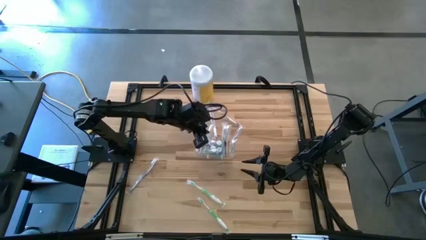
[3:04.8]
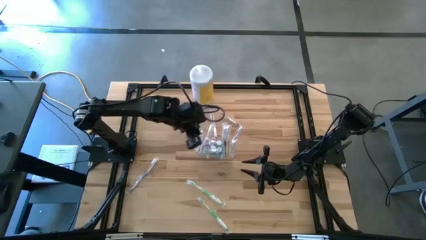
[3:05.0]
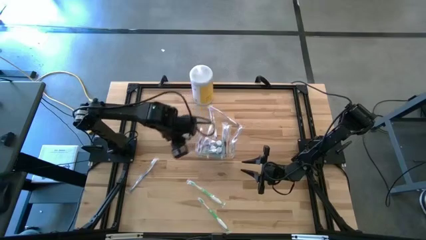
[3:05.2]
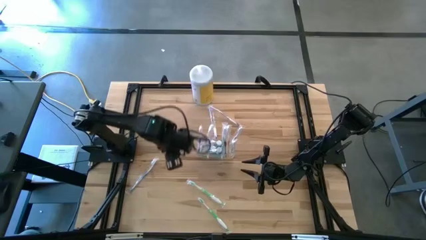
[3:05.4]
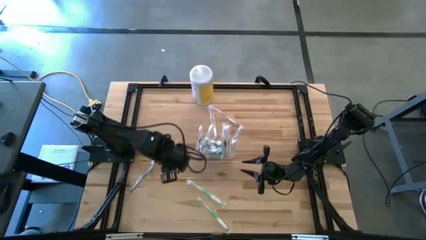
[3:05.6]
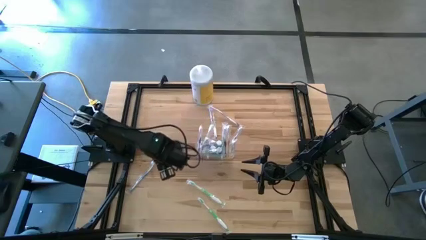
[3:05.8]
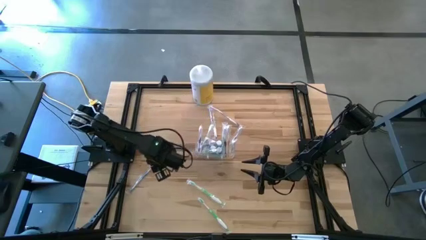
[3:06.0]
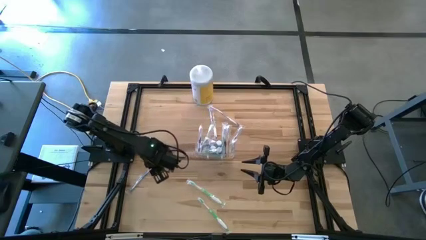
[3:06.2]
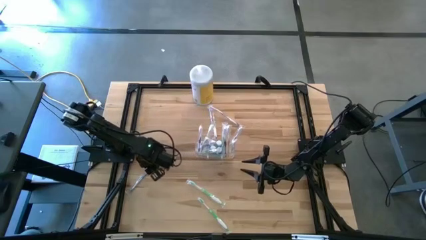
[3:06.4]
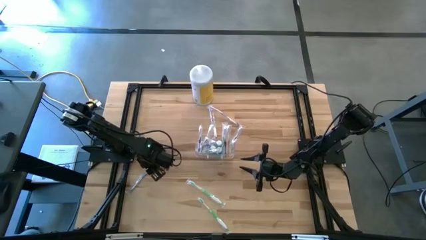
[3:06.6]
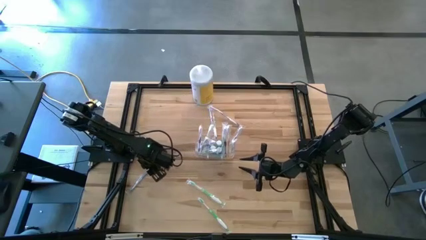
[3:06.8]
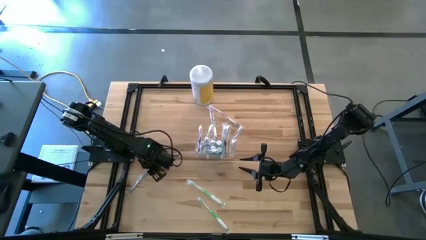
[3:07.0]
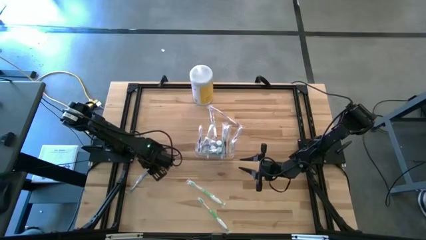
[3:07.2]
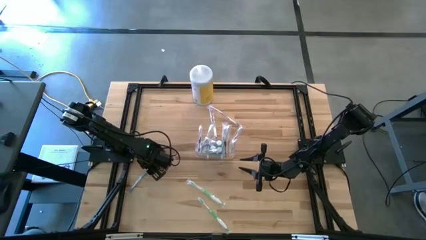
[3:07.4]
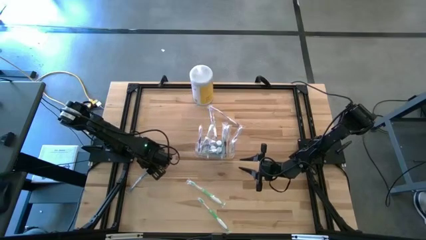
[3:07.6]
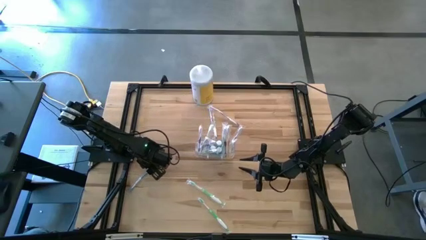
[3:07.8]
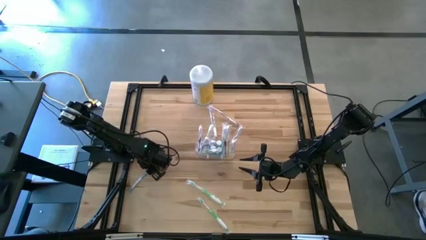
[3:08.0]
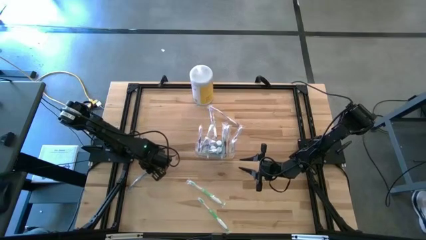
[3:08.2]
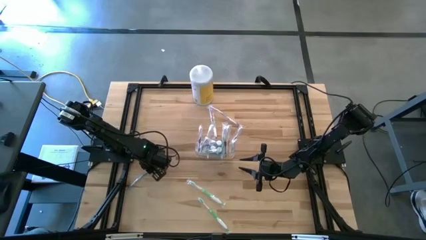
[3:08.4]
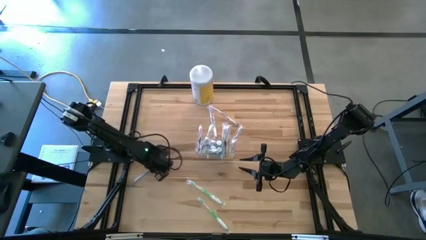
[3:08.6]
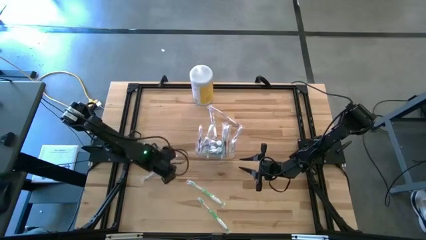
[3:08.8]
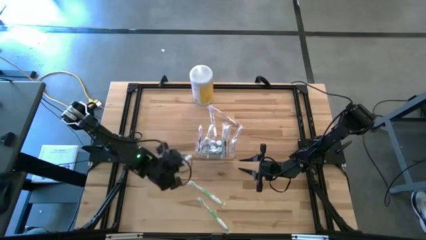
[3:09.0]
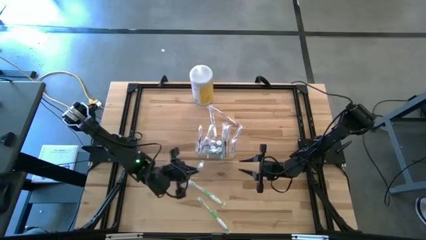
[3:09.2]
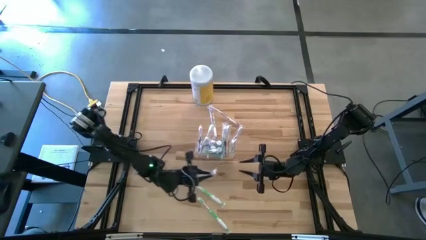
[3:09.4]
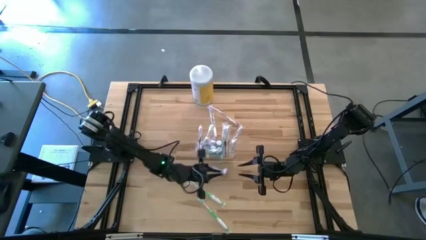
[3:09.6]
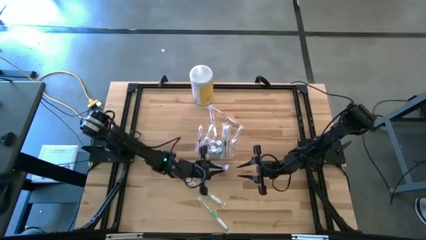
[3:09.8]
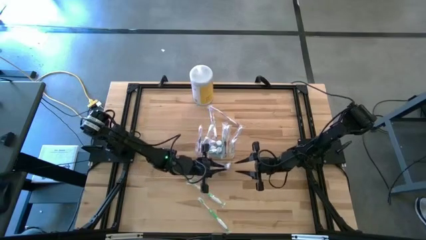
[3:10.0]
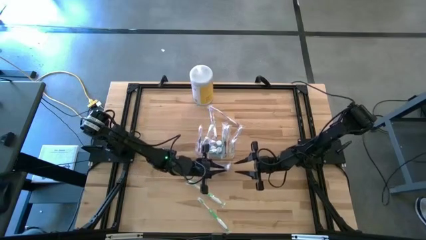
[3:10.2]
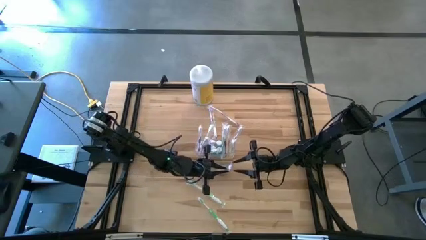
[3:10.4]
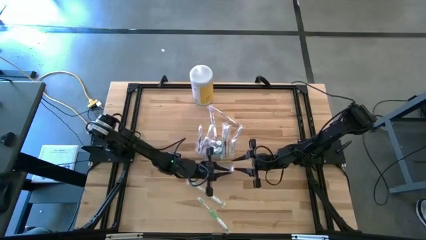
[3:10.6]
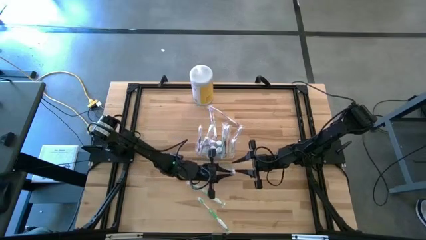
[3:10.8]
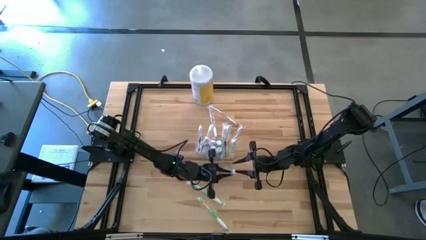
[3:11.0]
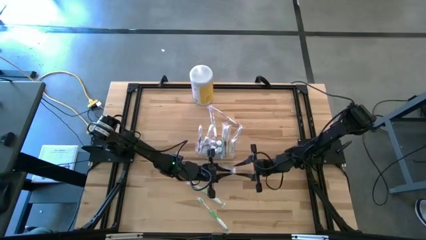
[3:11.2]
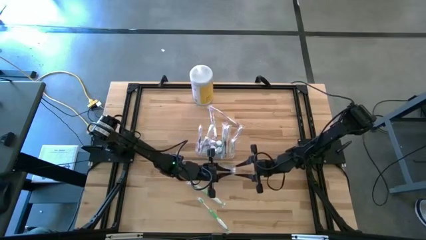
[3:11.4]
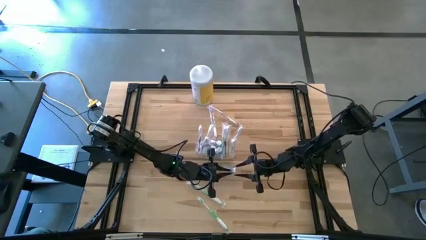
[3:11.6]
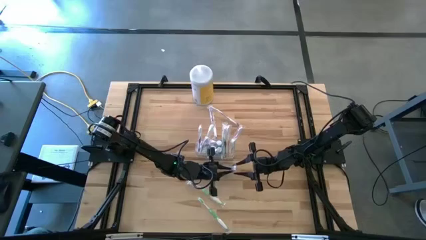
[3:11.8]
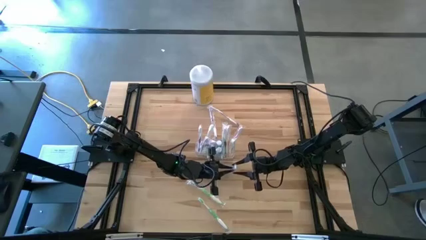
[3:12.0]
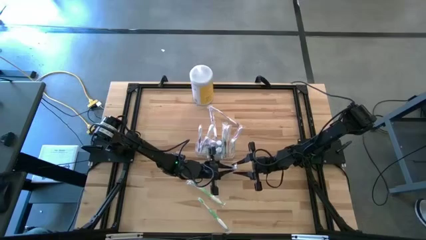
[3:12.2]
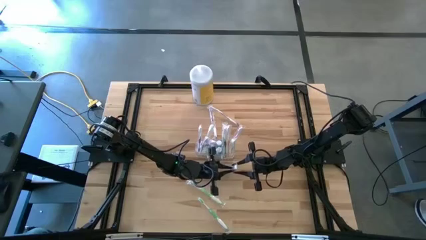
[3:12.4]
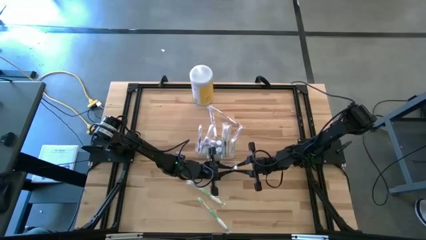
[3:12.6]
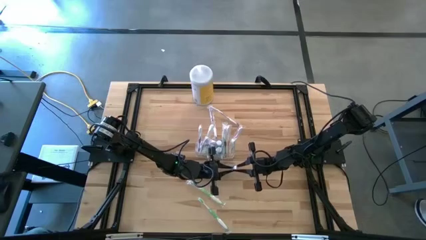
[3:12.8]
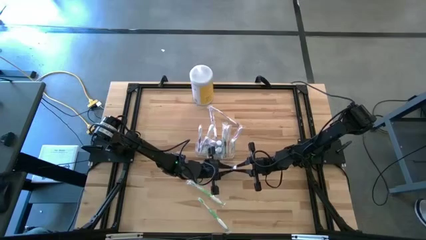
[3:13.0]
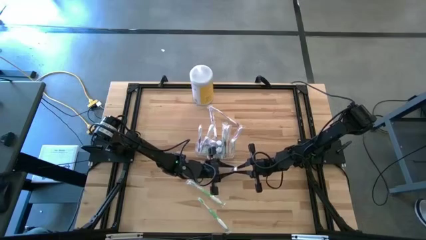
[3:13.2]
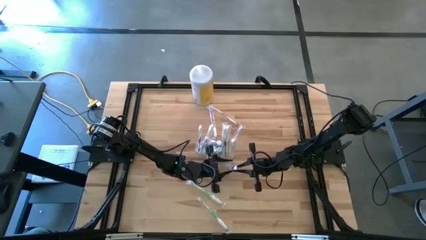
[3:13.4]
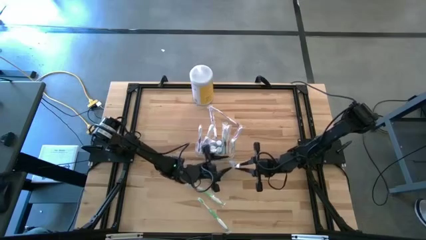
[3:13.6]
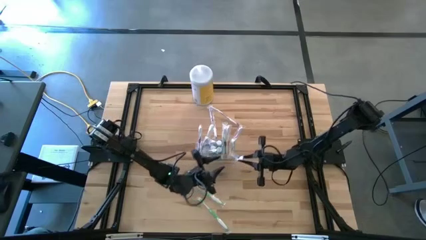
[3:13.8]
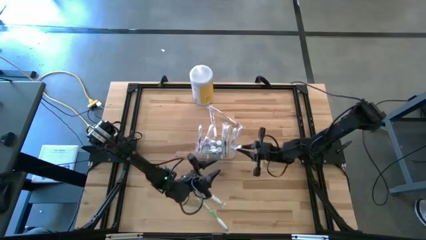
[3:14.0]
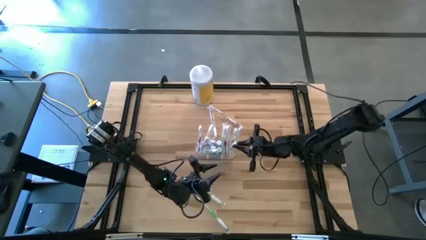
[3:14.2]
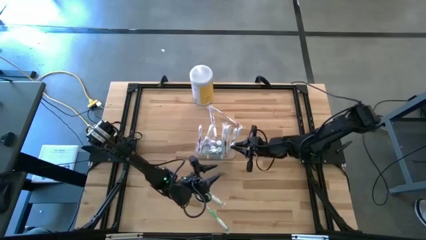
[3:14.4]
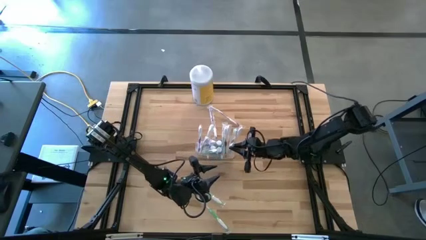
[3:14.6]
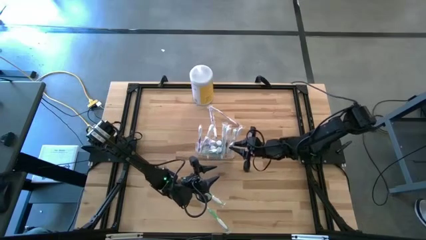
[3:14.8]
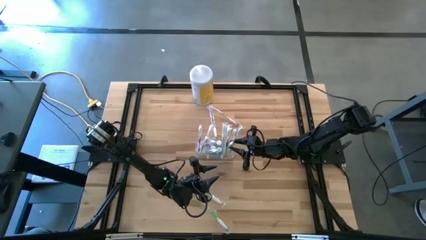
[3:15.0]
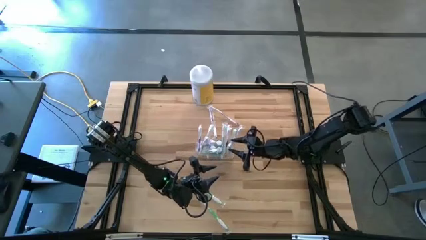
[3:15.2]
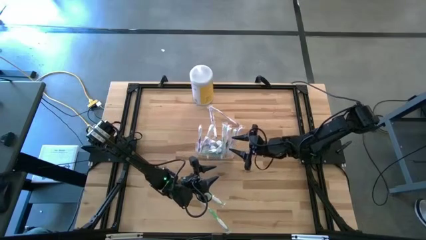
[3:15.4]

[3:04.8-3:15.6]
Task: Pick & Place toothbrushing station
Put the blue toothbrush into the transparent organizer

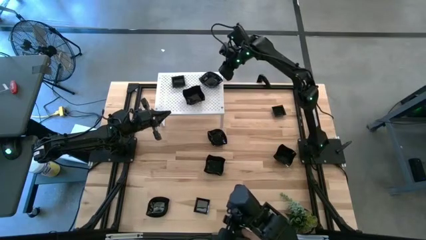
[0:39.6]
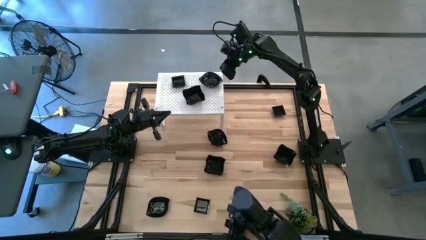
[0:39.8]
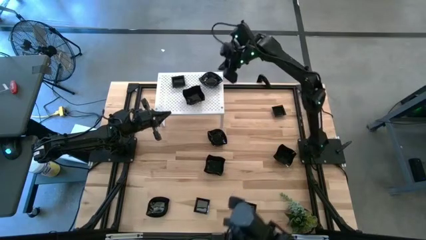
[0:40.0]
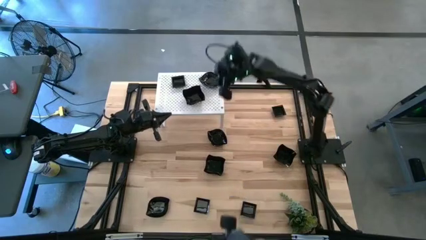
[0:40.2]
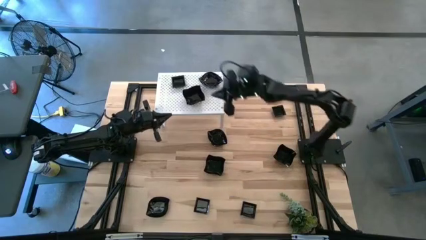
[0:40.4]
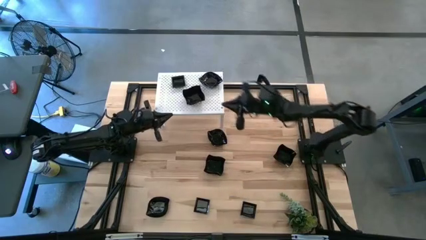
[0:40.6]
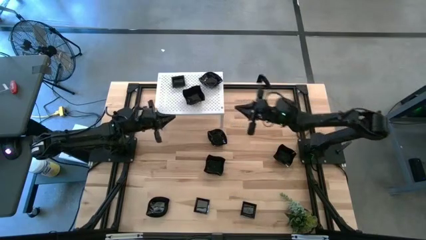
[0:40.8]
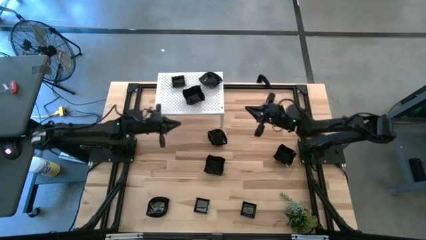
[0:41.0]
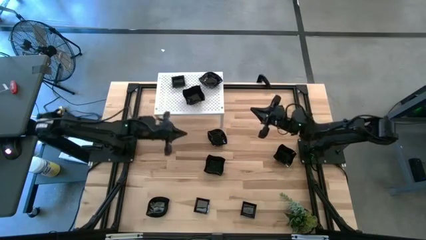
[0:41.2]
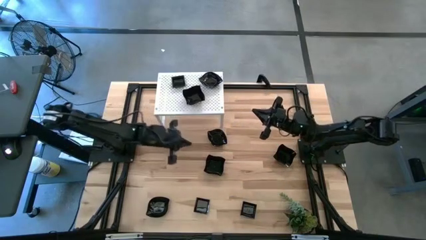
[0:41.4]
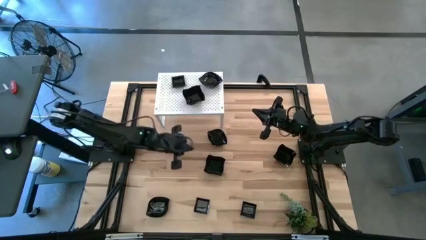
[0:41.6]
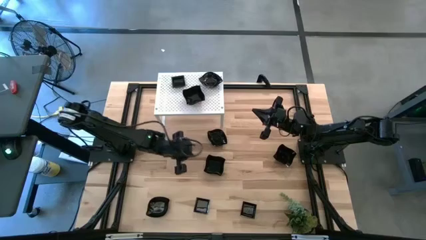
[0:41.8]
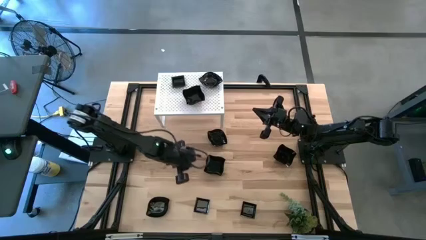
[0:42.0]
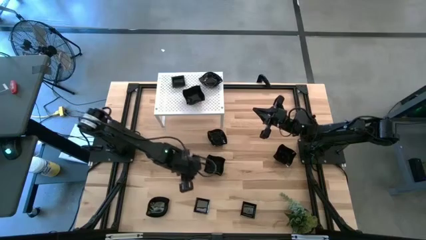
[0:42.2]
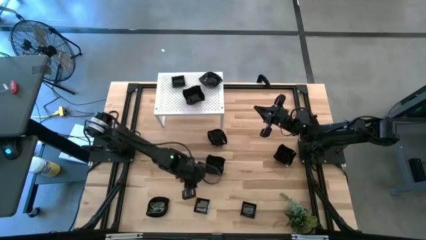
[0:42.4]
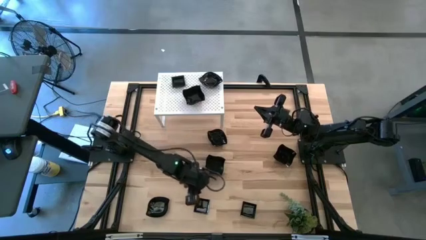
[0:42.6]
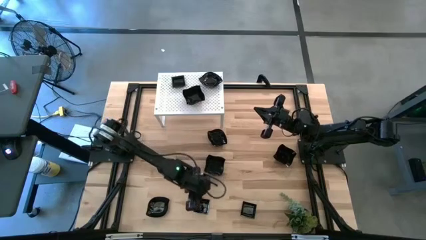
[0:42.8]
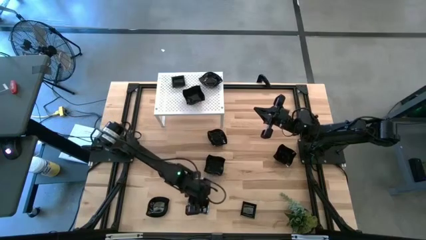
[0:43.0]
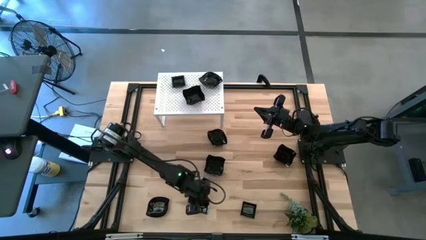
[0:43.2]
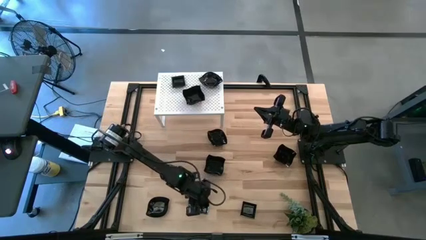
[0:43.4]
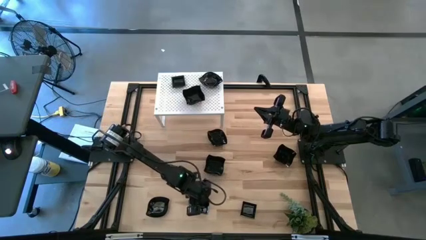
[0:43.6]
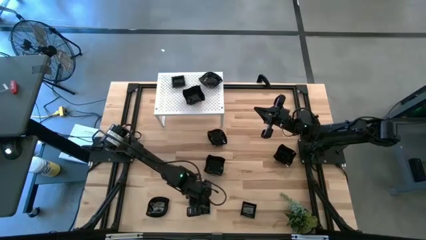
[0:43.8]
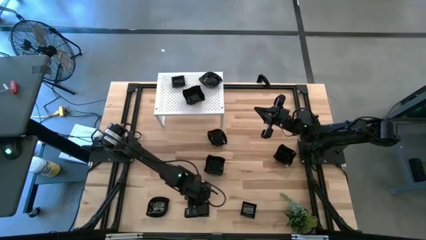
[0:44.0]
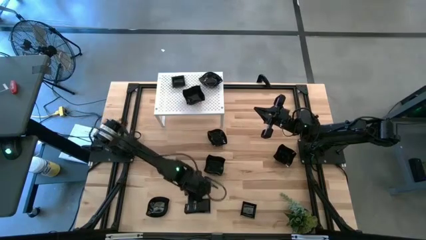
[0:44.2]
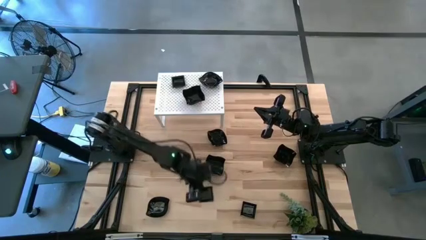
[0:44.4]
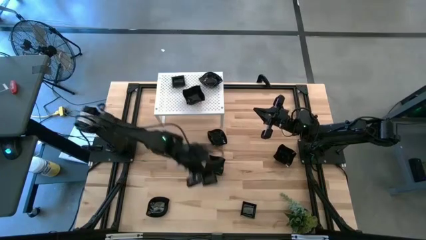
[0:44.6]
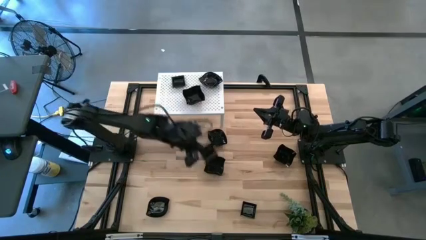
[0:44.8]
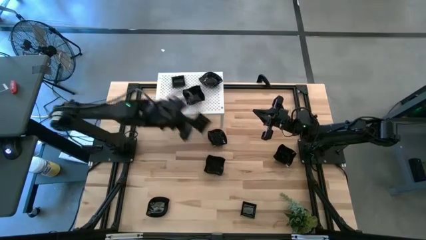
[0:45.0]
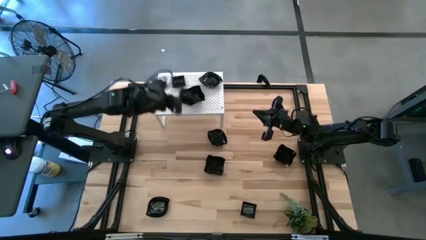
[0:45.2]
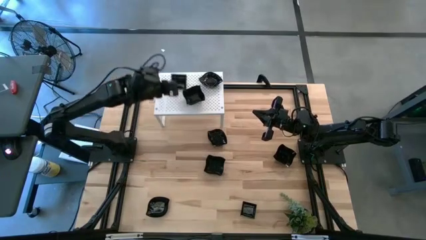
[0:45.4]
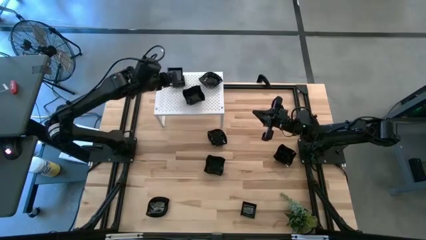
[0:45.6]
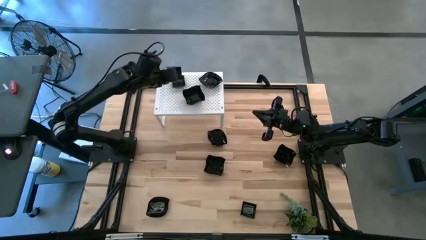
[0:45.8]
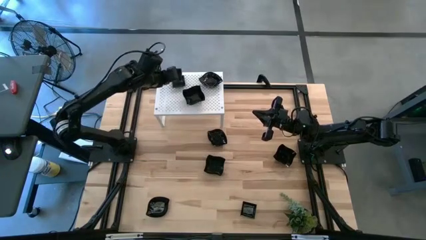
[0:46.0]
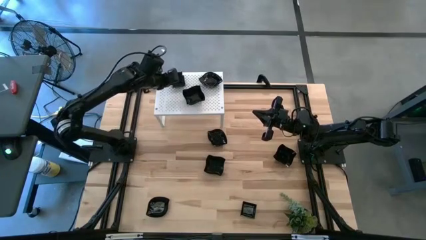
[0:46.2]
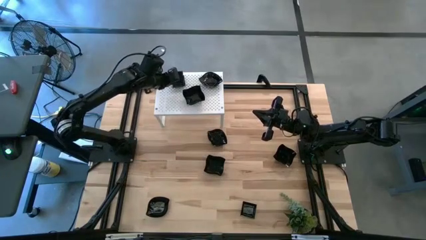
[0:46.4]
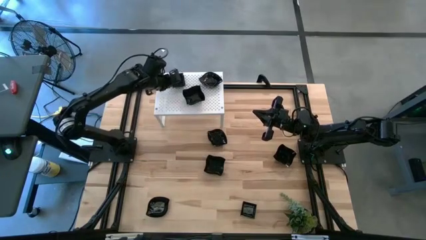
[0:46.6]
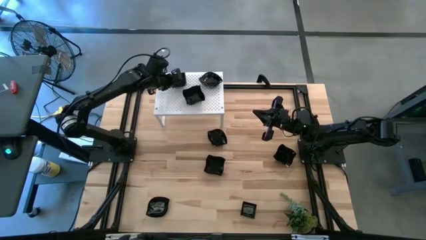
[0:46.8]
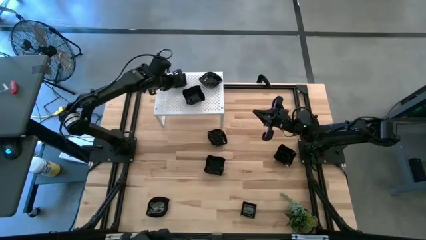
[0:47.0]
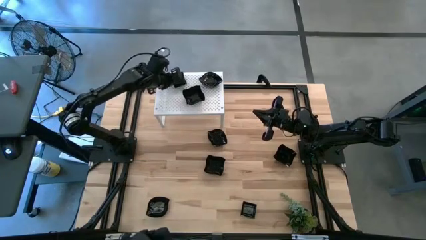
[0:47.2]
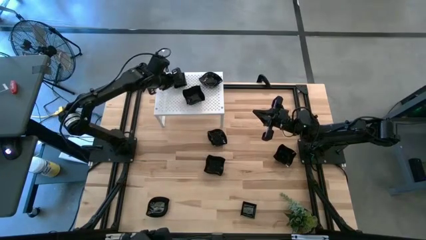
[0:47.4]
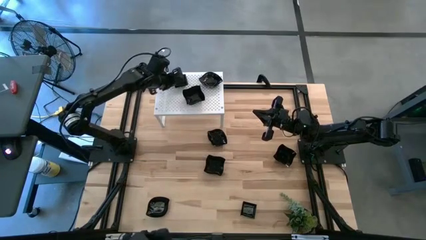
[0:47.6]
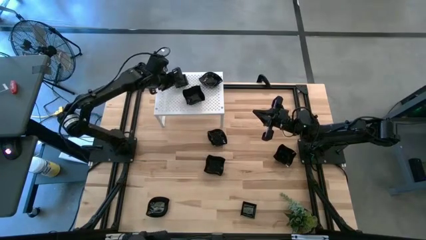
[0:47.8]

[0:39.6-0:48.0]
Task: Pick & Place Mini shaped plates
Stack the black square plate on top of the black square plate on the shelf
